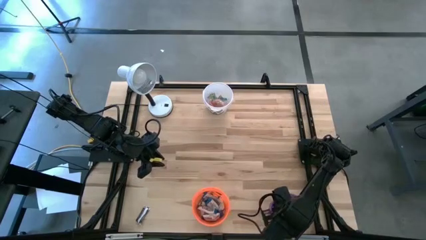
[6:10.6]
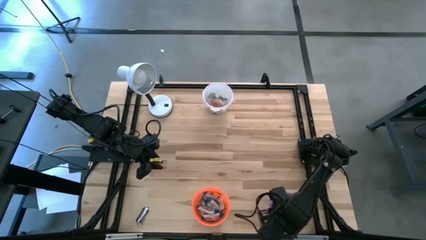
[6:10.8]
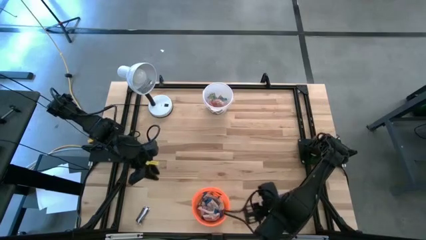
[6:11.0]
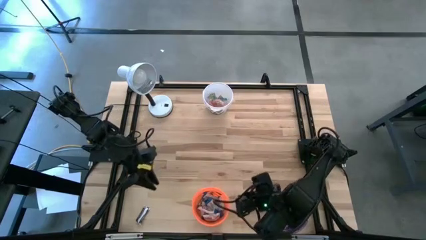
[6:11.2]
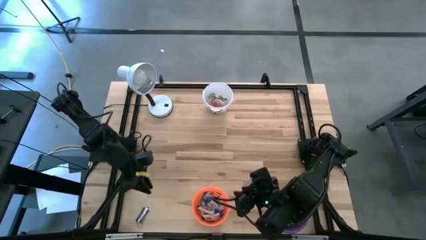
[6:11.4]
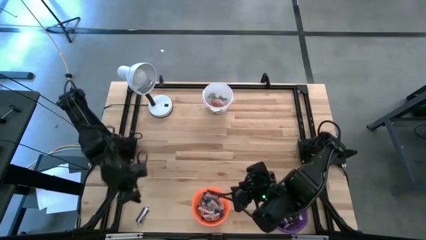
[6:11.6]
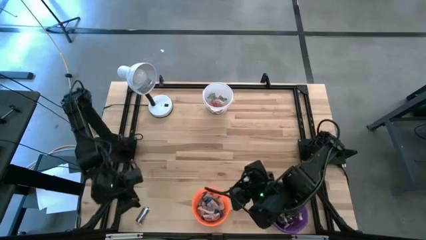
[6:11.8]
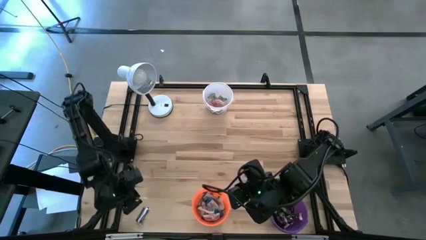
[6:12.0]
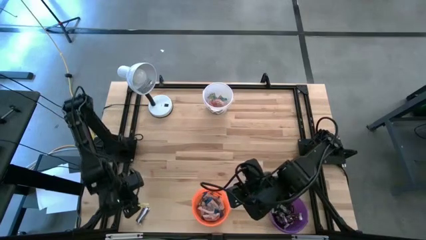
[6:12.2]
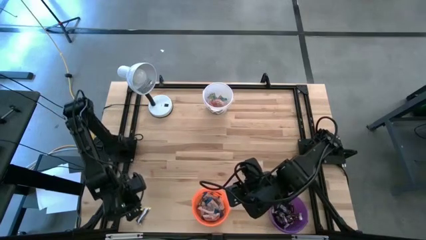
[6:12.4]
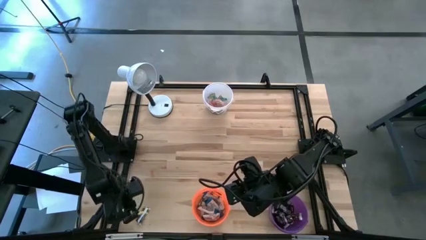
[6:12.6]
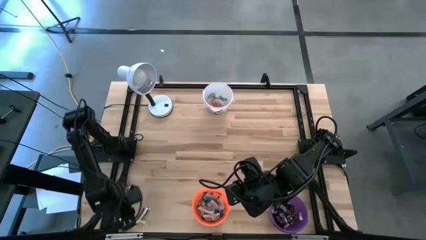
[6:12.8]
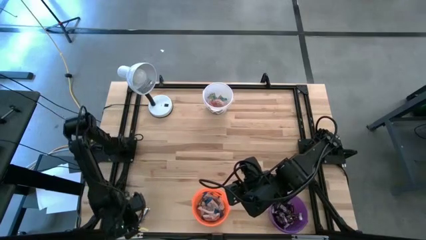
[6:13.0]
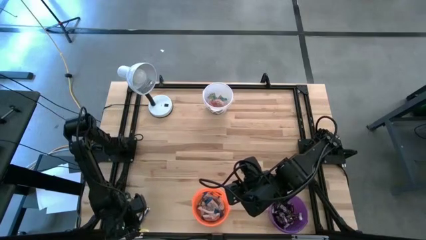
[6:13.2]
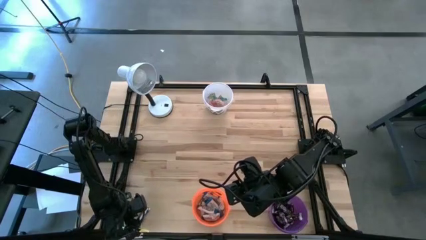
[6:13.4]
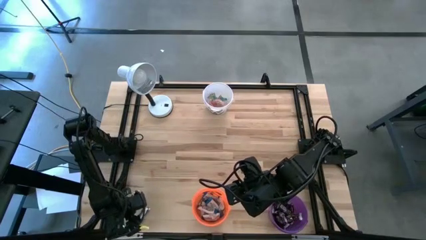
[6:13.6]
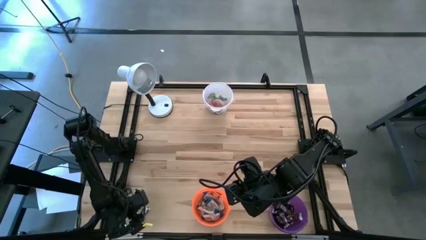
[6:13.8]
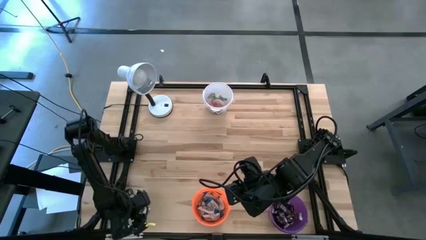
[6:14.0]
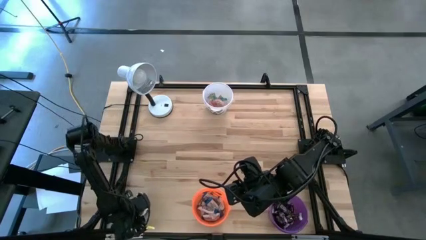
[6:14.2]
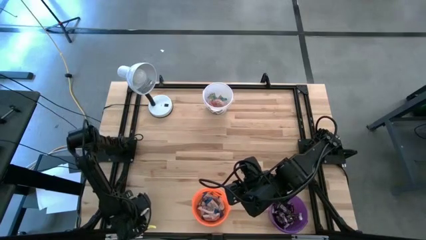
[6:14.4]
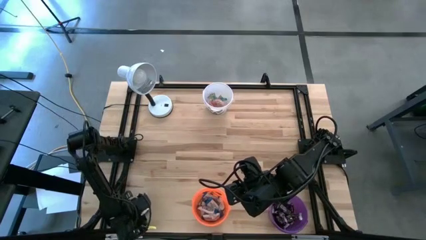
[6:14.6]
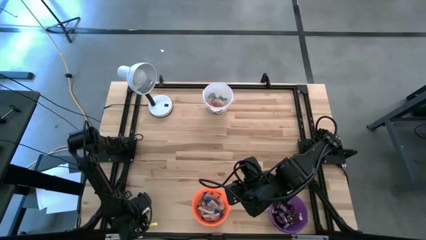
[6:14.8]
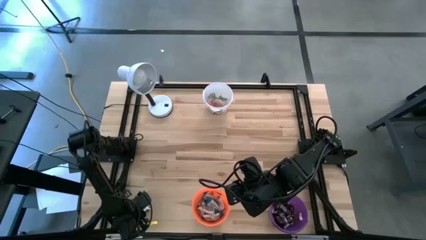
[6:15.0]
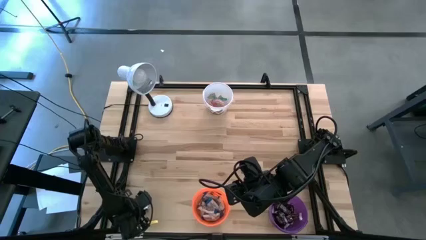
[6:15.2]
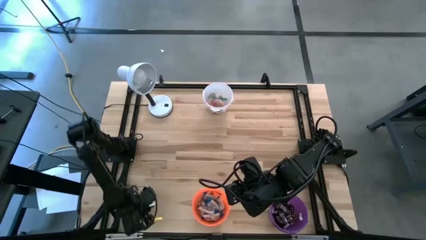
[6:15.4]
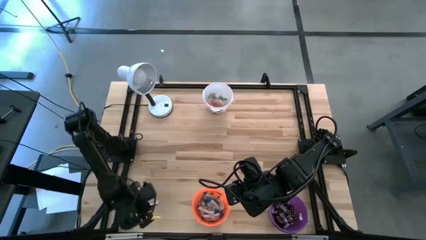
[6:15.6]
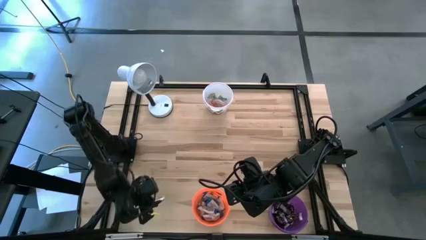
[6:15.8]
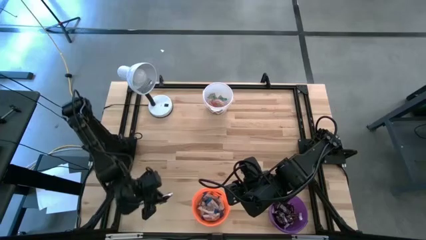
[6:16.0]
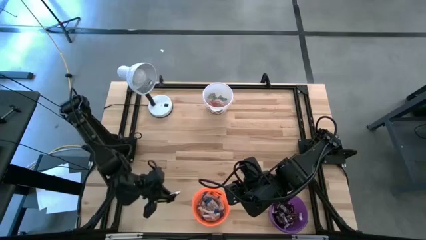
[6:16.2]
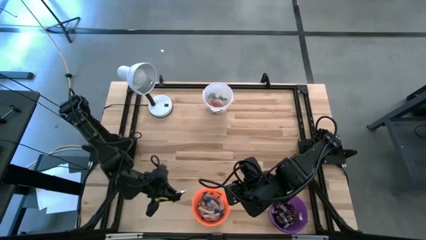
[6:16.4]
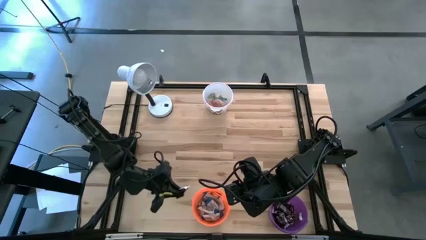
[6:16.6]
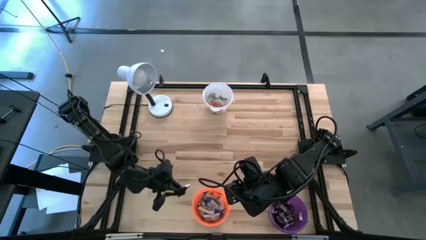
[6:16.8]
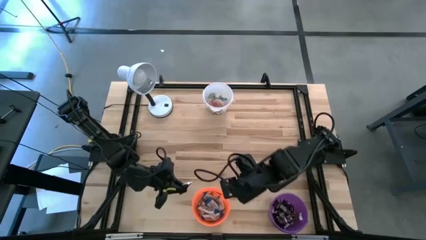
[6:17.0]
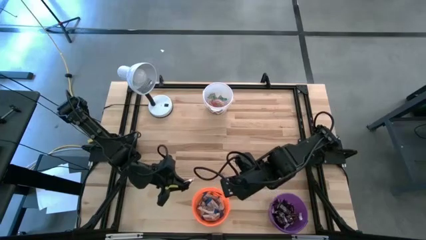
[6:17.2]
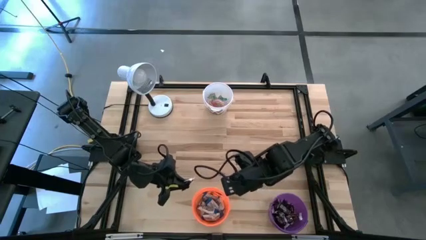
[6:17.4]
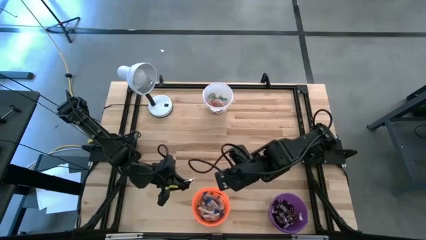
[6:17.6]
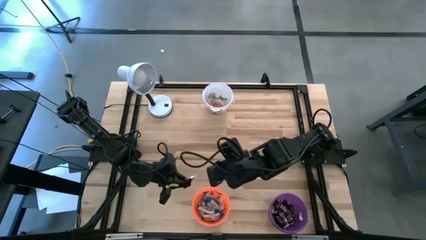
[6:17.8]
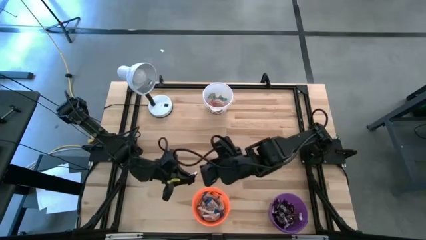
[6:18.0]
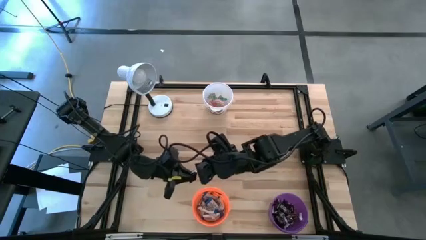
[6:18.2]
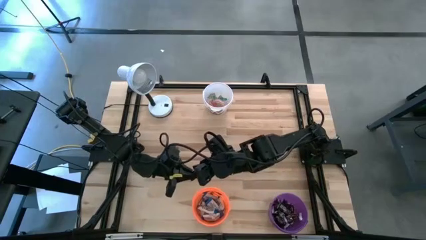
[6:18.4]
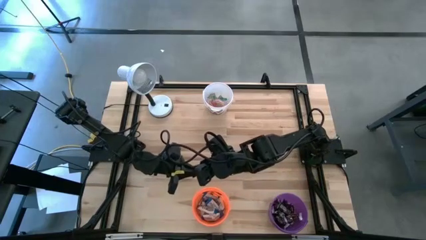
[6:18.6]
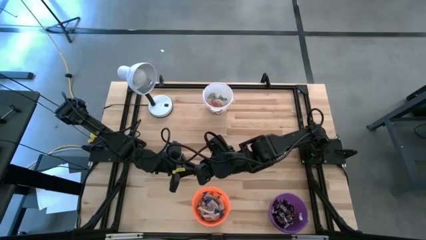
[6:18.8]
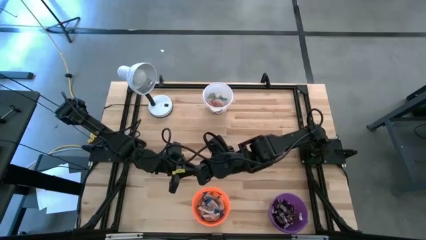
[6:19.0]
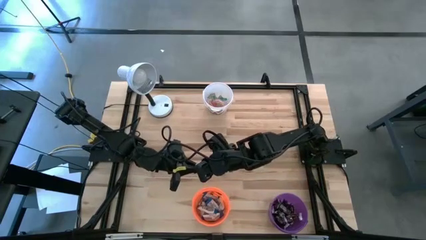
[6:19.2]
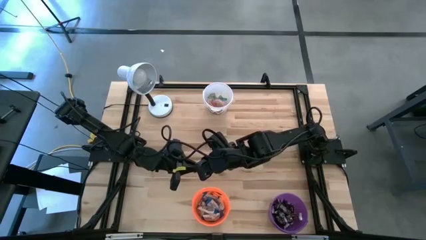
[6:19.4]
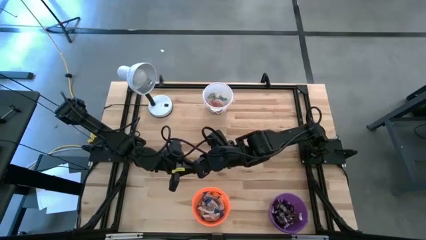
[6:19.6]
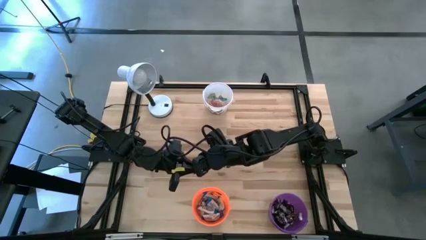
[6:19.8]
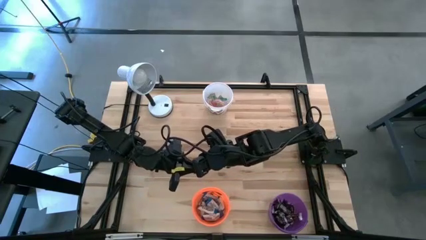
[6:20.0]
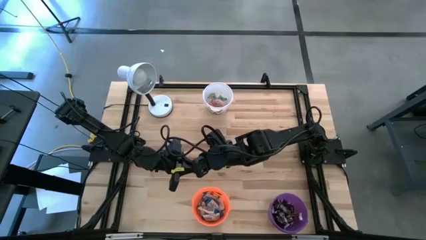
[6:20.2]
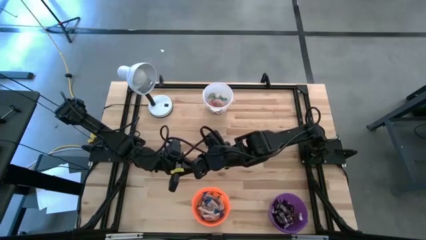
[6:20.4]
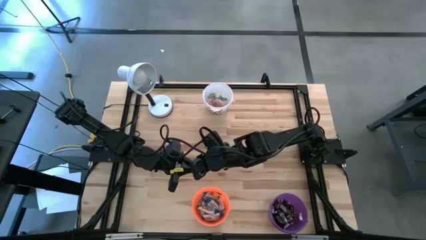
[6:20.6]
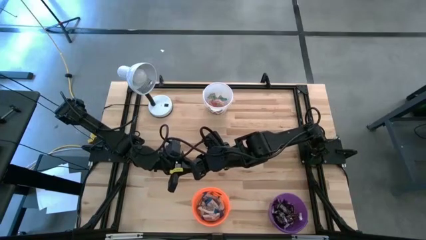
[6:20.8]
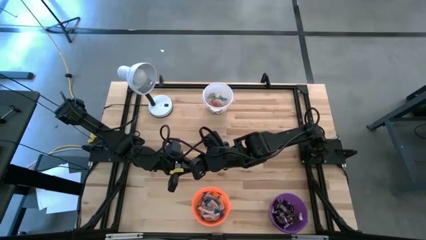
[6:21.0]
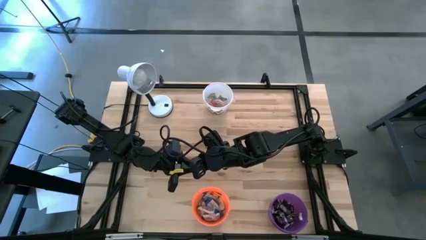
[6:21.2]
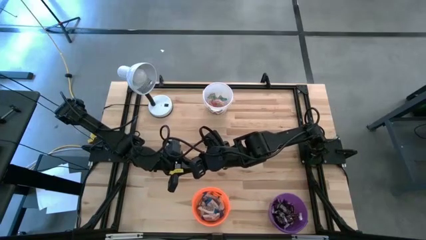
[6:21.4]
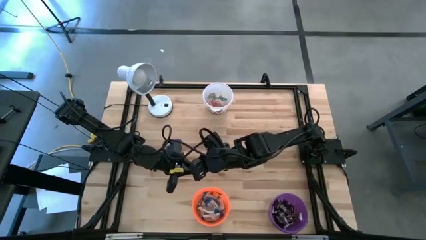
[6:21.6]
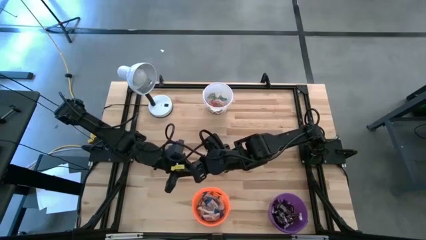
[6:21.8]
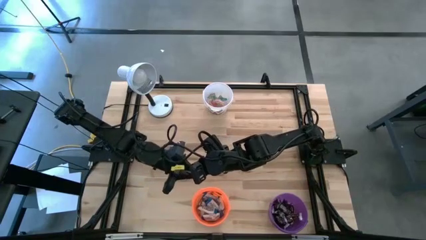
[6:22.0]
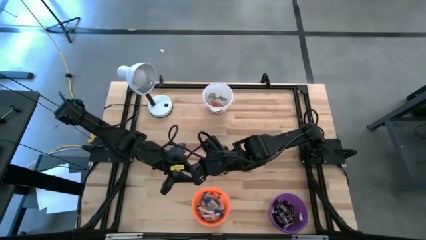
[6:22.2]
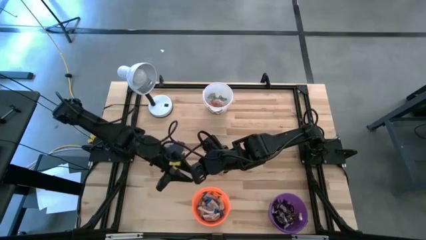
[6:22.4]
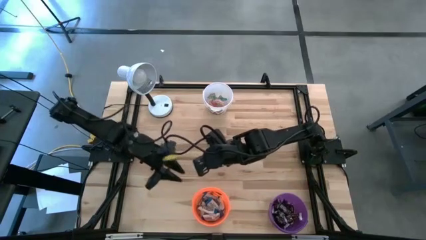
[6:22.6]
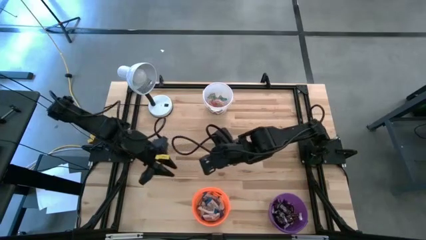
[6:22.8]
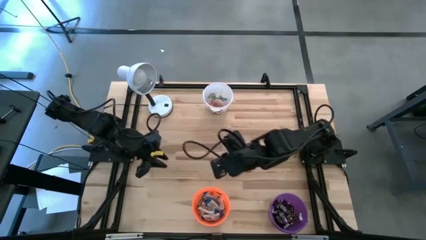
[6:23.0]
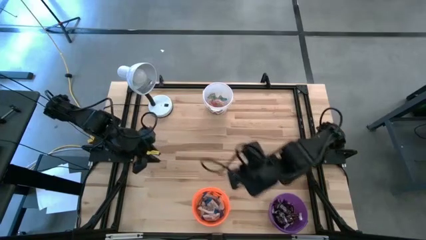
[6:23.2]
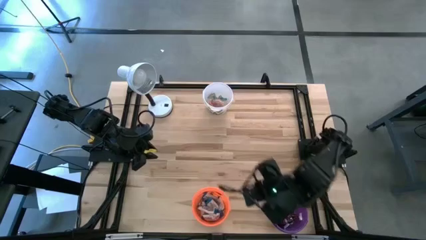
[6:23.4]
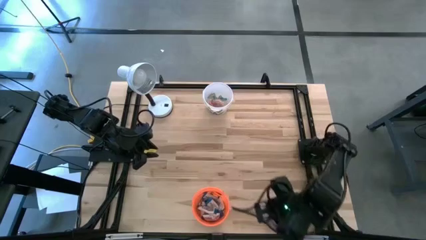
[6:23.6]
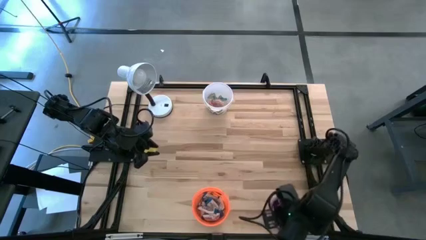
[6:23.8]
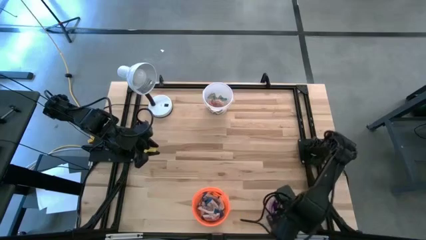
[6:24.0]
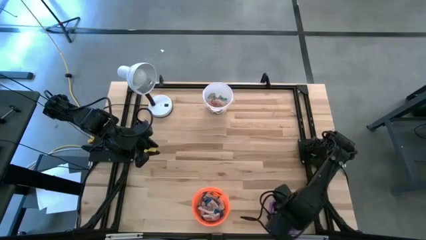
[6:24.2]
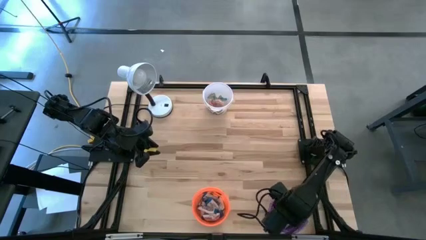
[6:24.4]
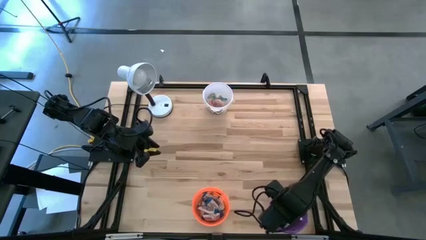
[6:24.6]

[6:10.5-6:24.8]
Task: Organize candy in baskets
Put the dark brown chocolate bar into the dark purple bucket
